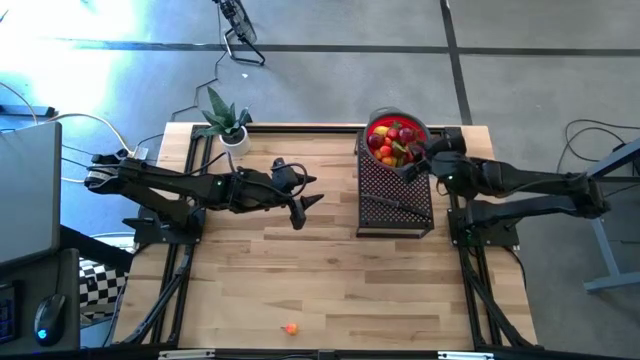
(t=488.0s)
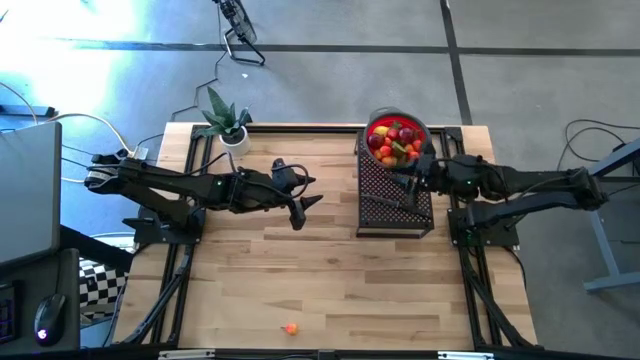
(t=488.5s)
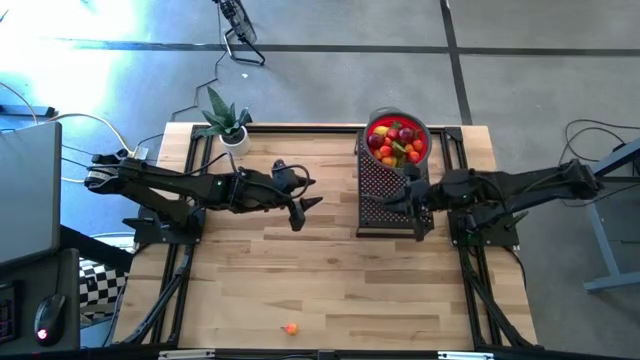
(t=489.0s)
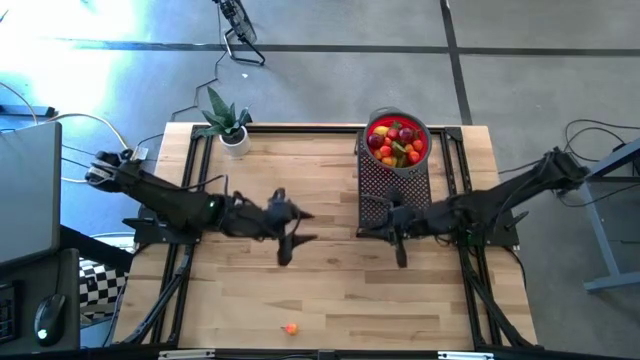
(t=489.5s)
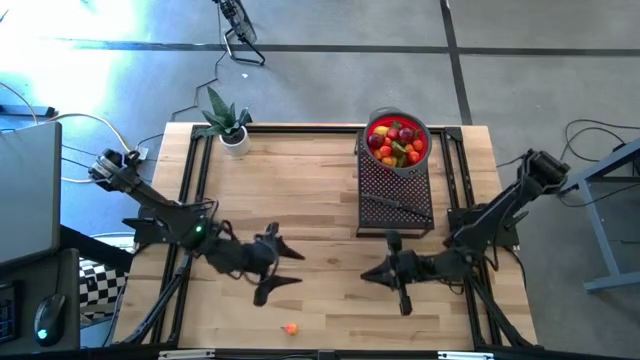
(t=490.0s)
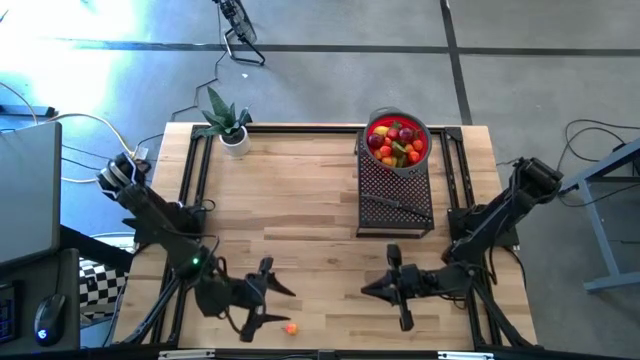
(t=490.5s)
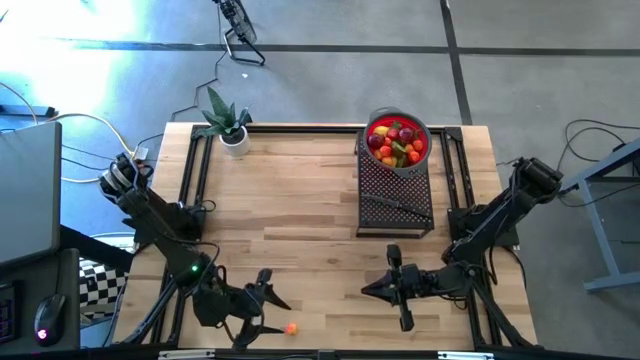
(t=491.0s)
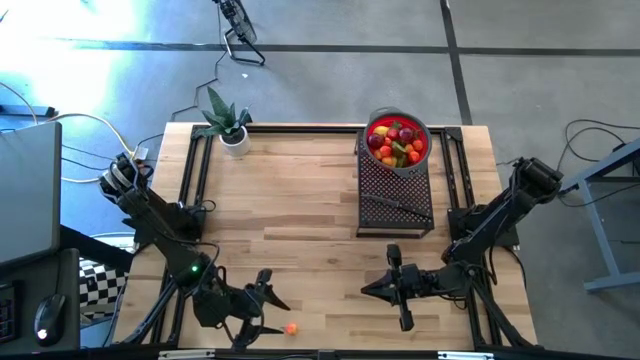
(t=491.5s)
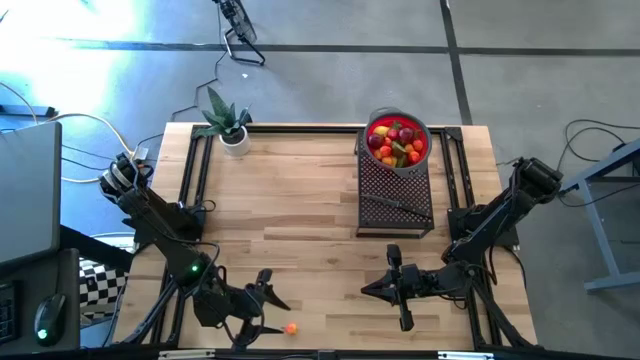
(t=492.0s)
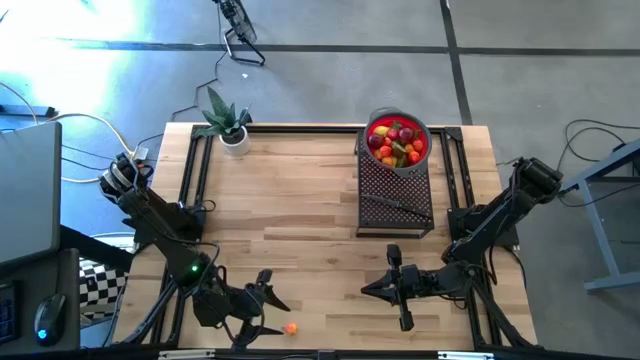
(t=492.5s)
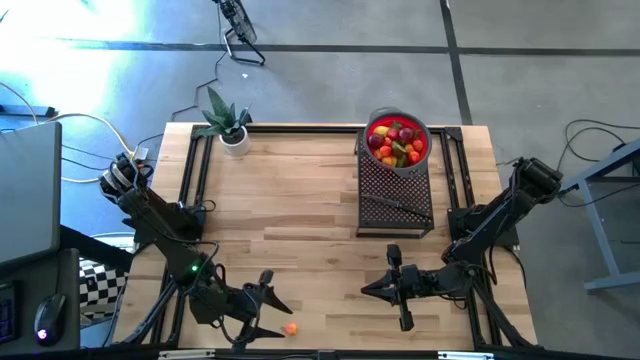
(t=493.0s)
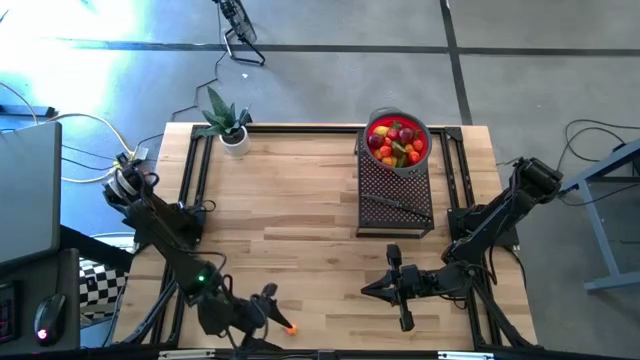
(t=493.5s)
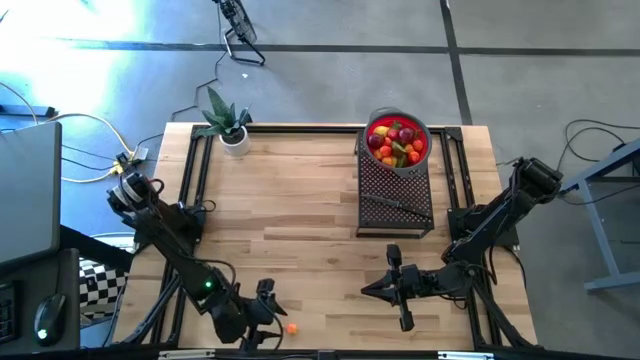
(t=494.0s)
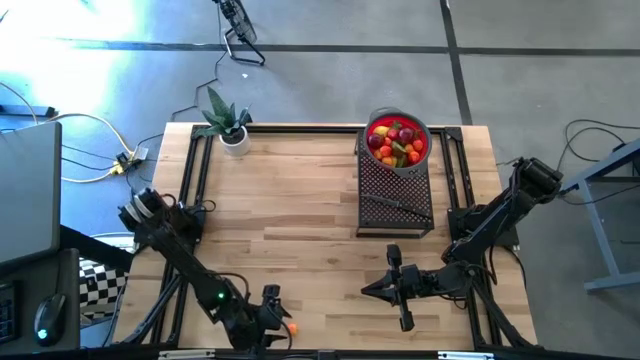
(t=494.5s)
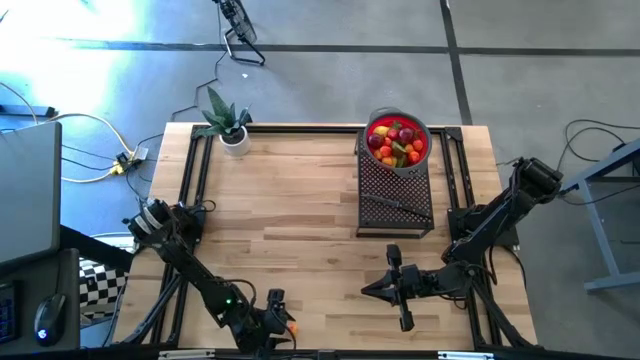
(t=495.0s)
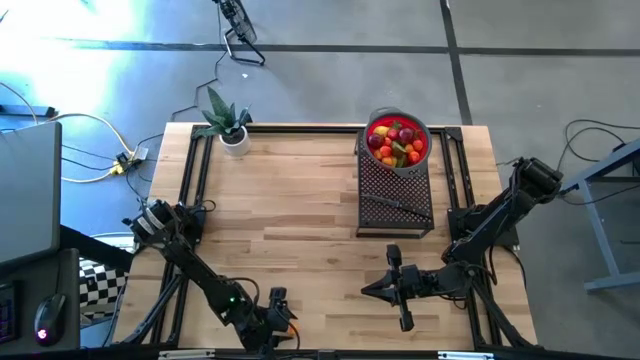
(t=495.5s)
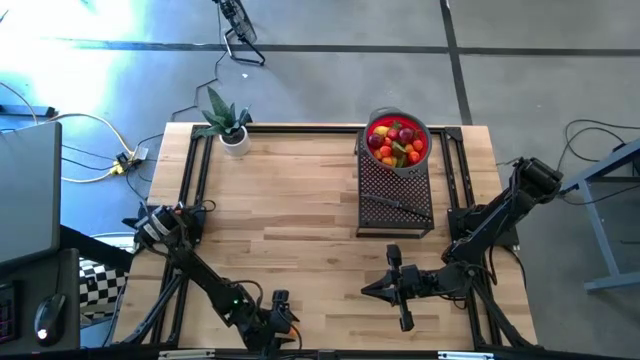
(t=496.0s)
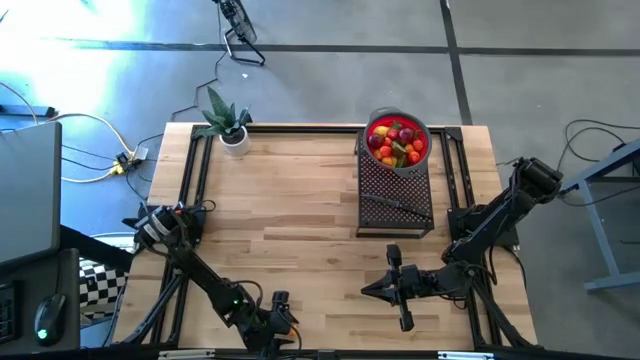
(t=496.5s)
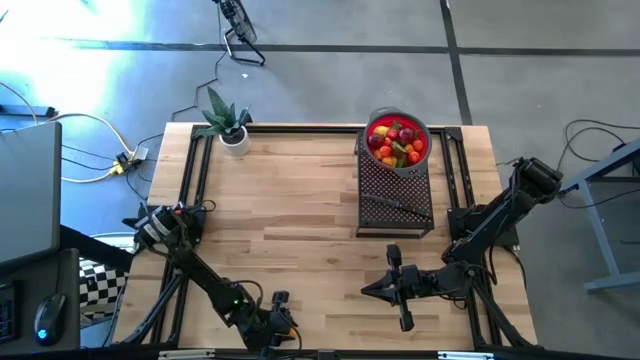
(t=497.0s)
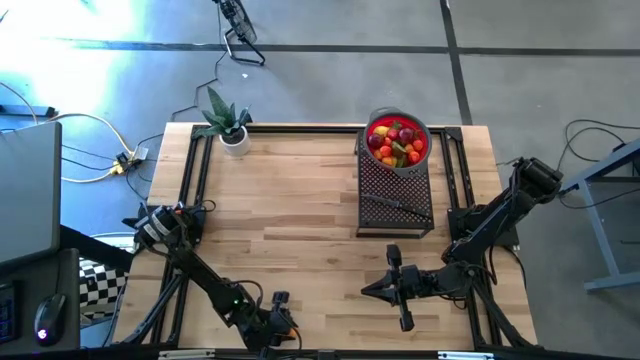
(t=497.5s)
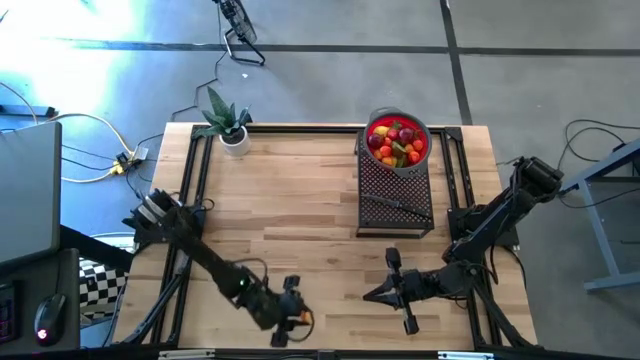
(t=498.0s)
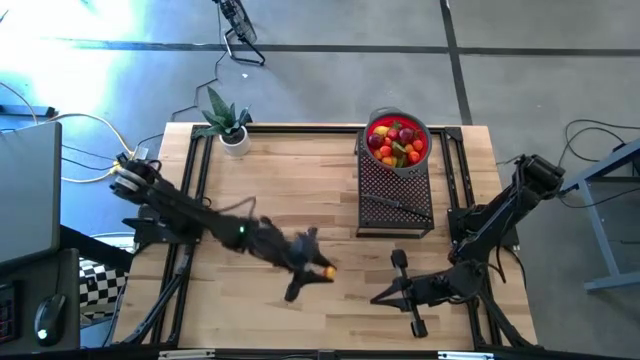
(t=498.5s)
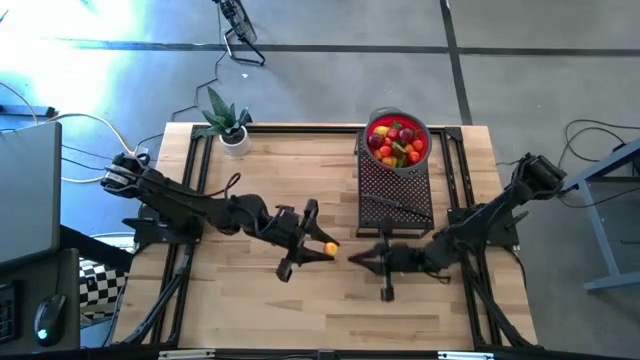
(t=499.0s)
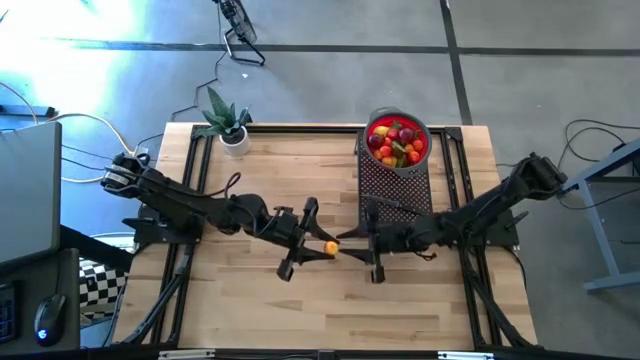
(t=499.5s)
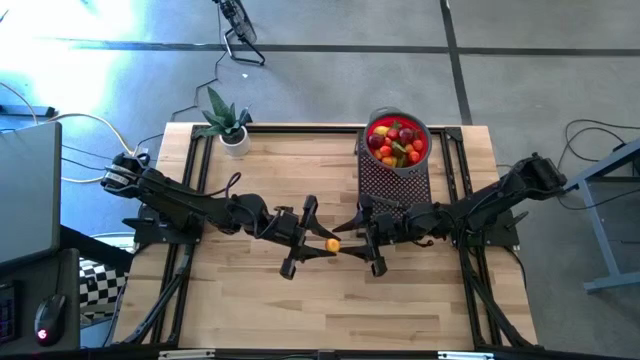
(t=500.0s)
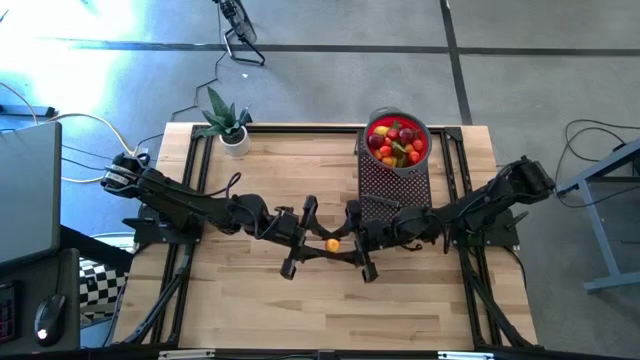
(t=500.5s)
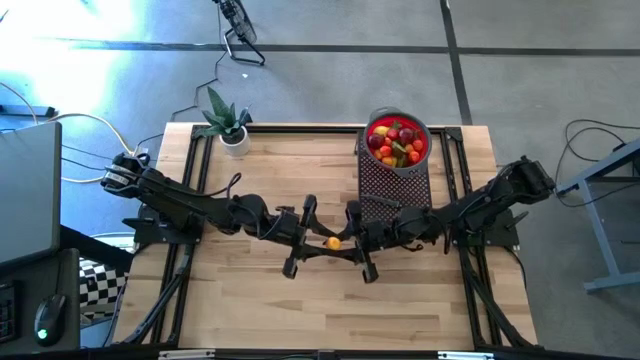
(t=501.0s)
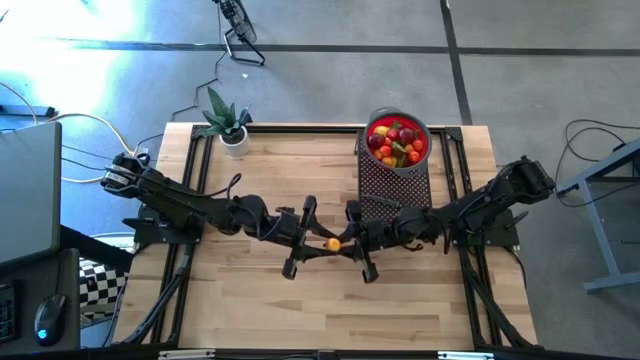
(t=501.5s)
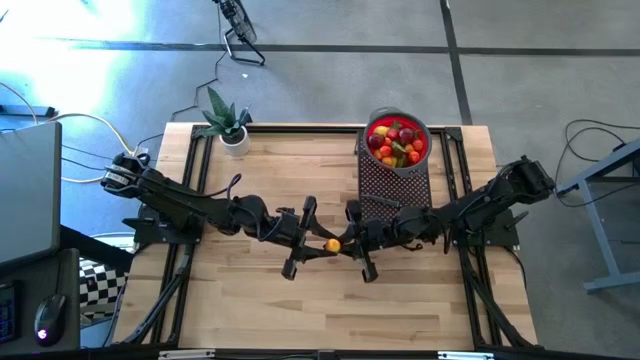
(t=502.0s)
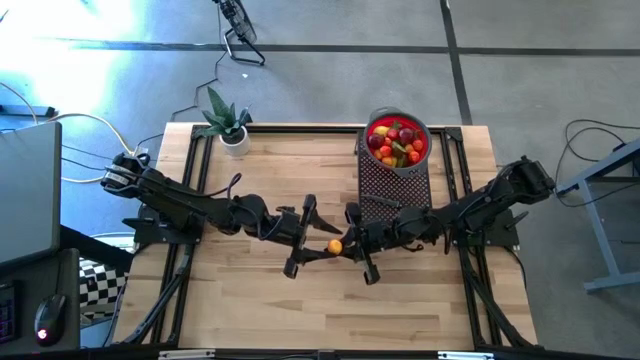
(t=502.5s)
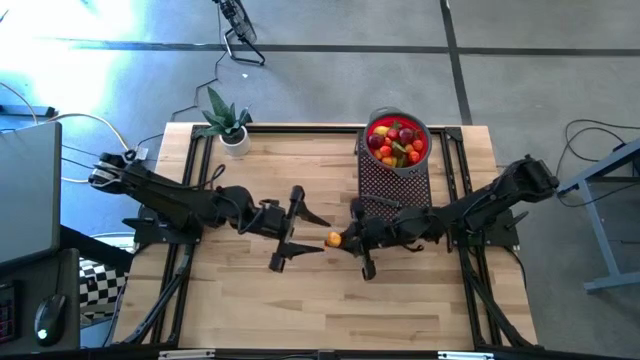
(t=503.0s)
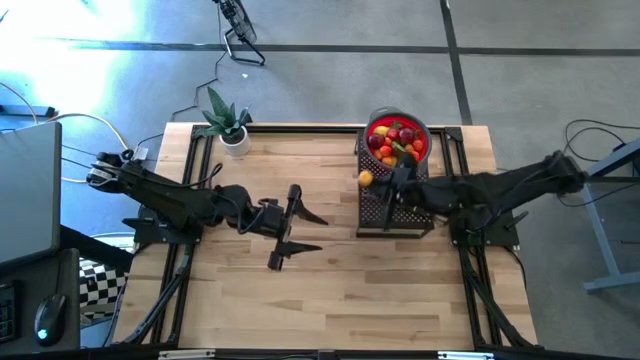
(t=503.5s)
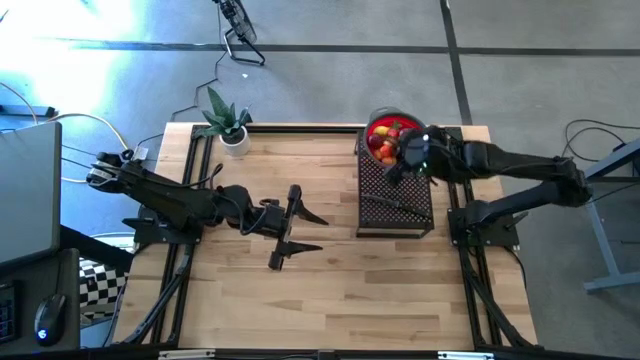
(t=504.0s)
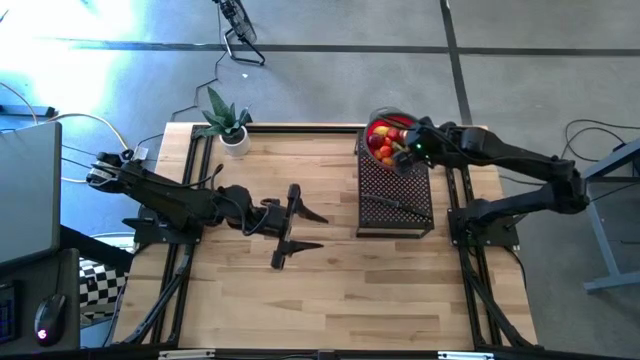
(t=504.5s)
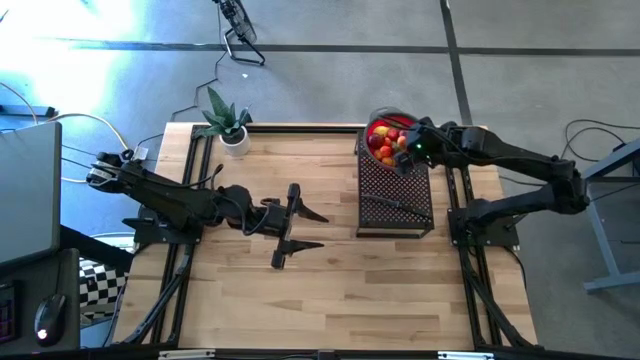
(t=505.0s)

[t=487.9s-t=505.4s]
Task: Pick & Place Fruit
Put the pear into the strainer bowl on the shelf

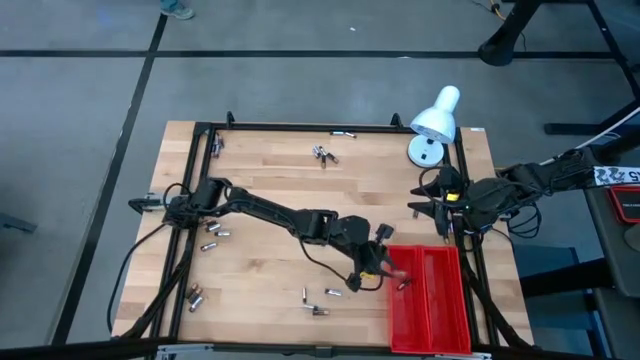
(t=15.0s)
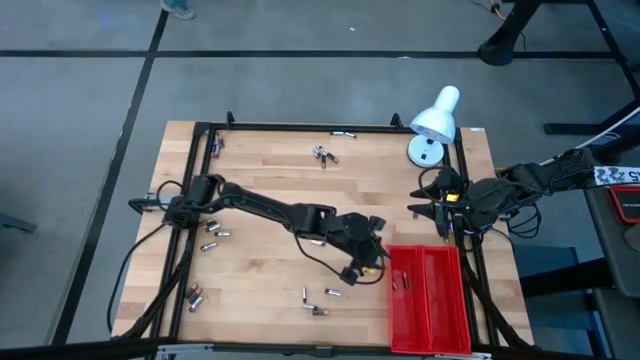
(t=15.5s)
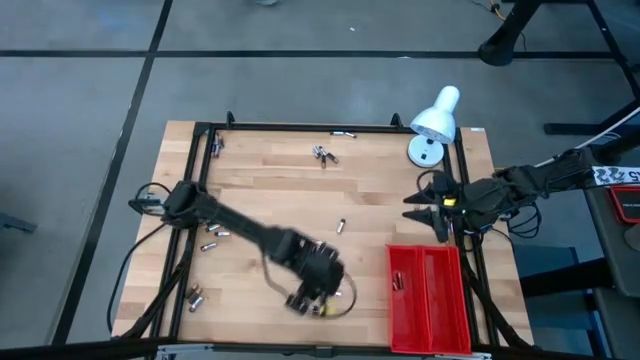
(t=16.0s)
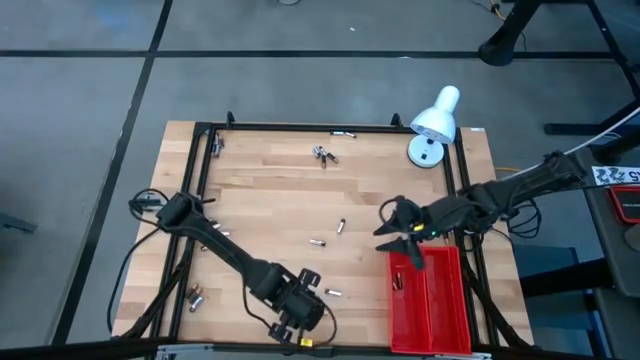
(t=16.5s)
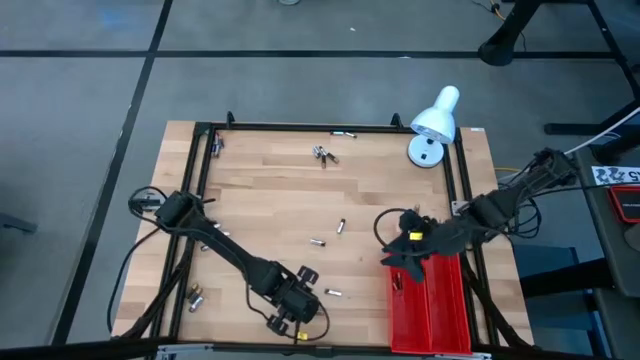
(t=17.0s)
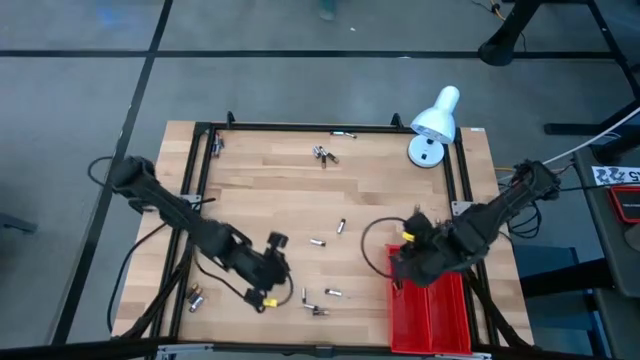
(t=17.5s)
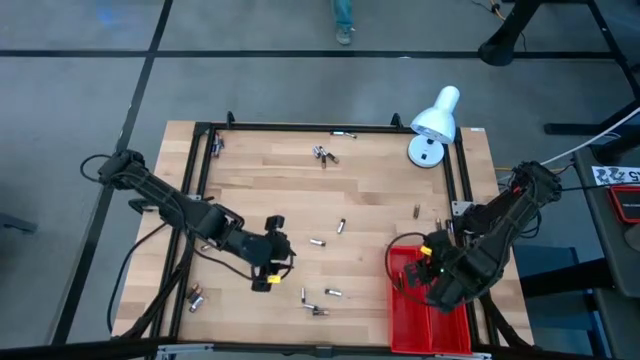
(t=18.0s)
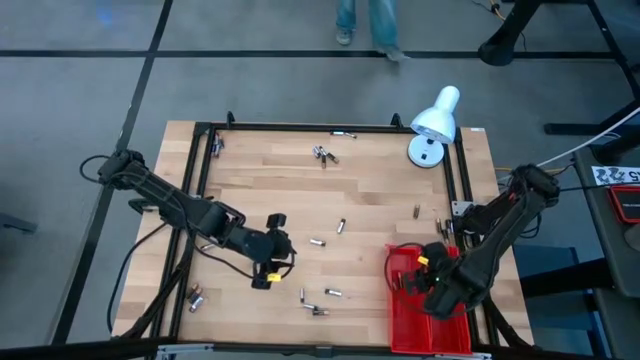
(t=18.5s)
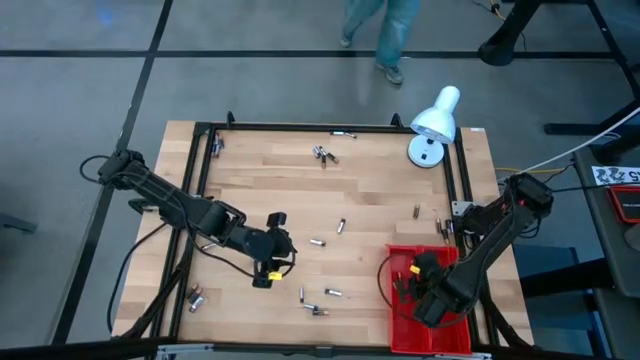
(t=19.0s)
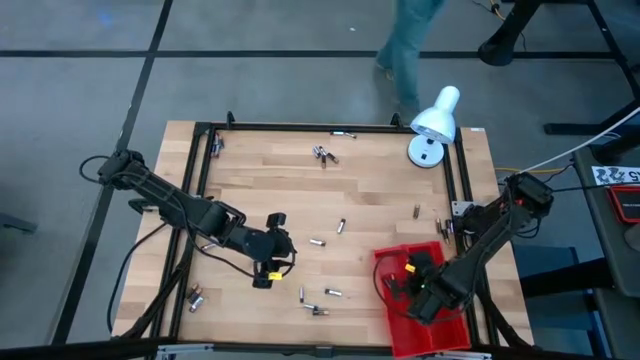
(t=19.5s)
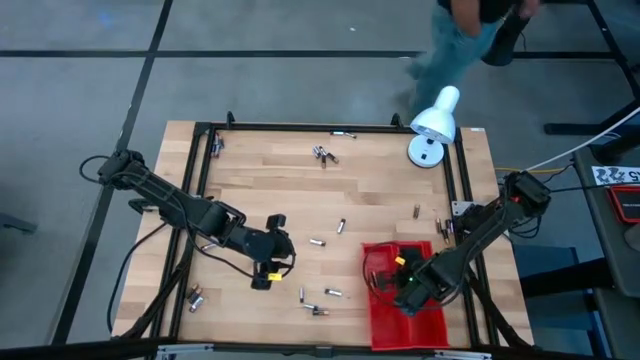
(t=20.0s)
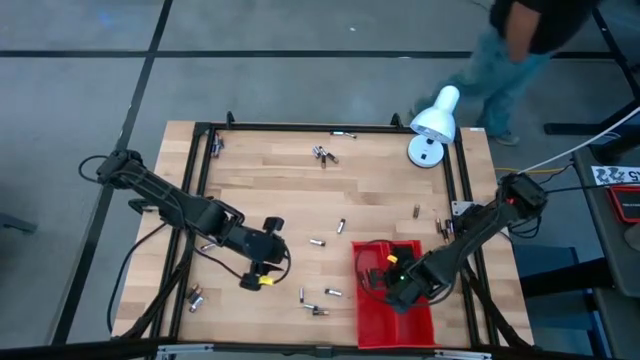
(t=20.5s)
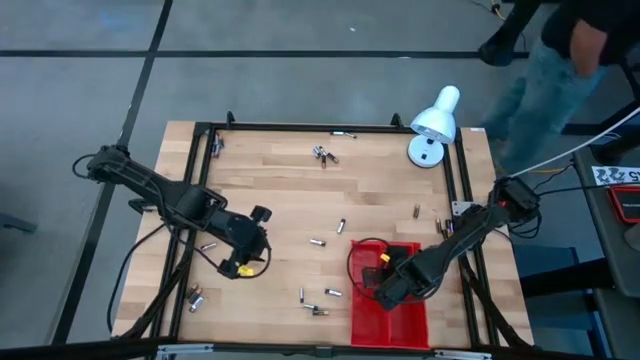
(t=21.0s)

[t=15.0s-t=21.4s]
Task: Sort batteries
Adjust the red bins
